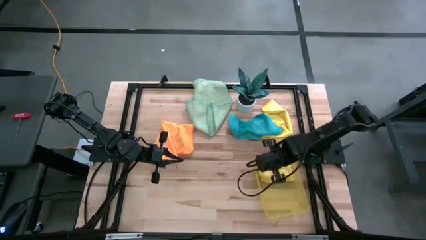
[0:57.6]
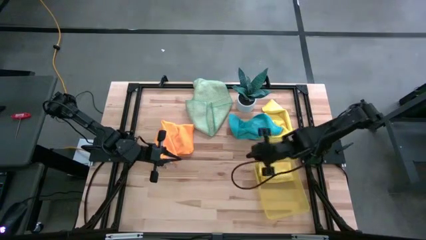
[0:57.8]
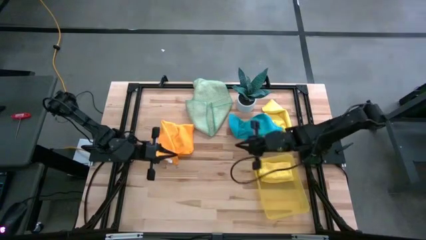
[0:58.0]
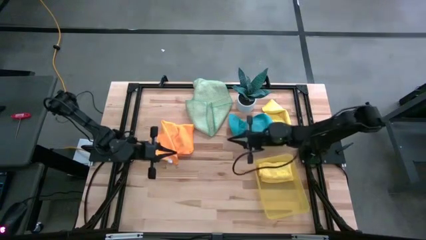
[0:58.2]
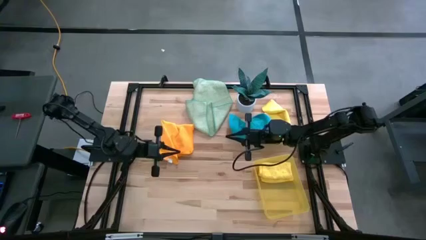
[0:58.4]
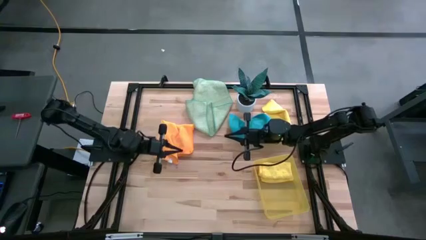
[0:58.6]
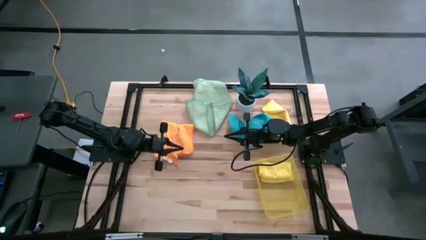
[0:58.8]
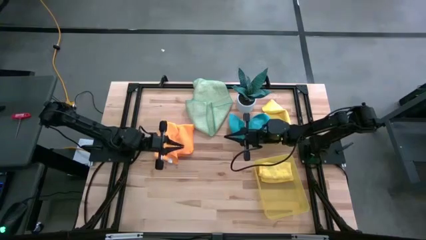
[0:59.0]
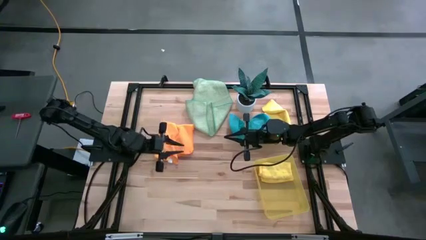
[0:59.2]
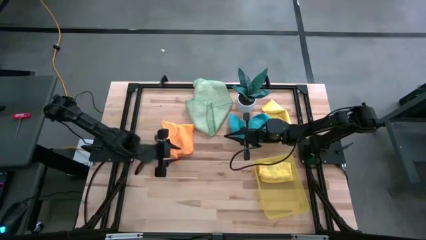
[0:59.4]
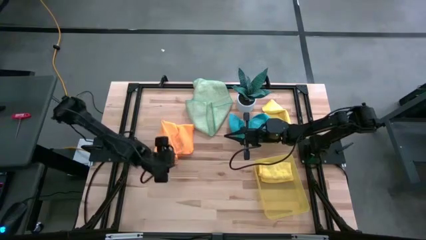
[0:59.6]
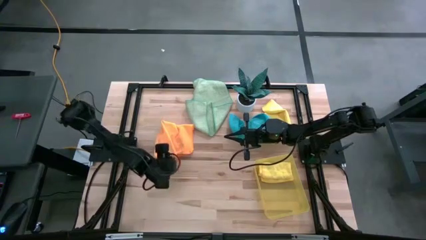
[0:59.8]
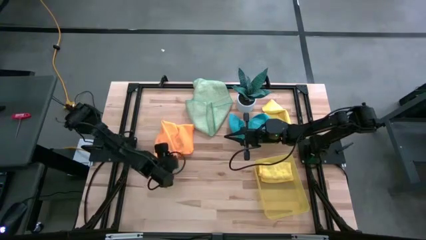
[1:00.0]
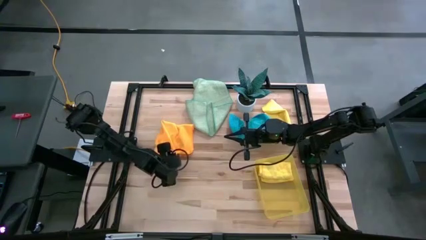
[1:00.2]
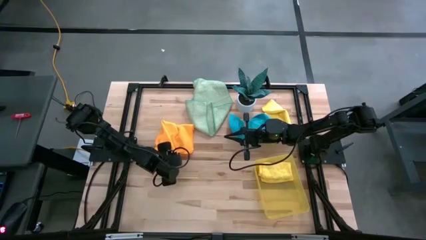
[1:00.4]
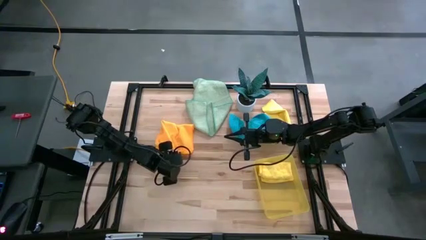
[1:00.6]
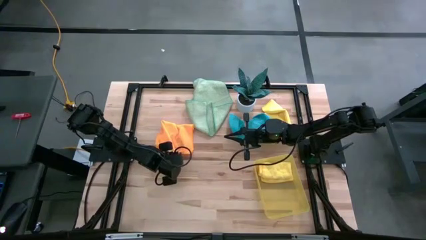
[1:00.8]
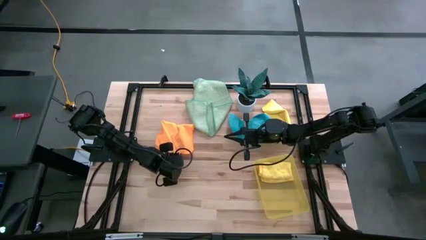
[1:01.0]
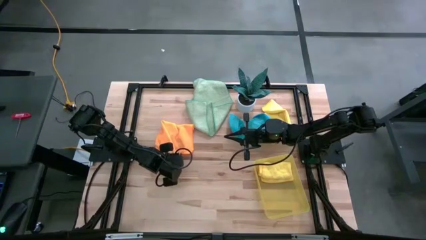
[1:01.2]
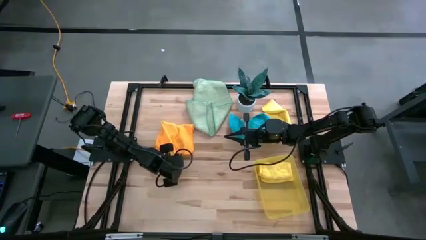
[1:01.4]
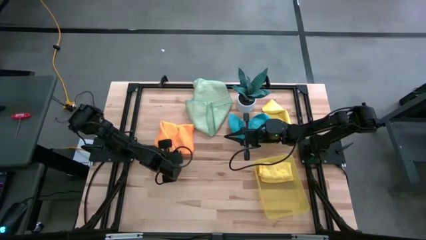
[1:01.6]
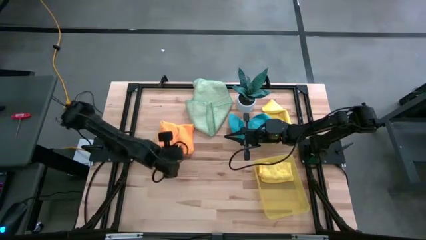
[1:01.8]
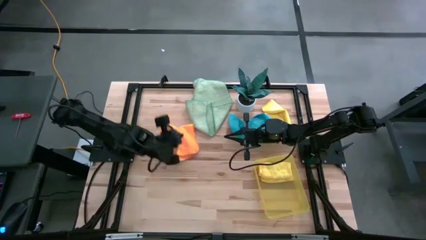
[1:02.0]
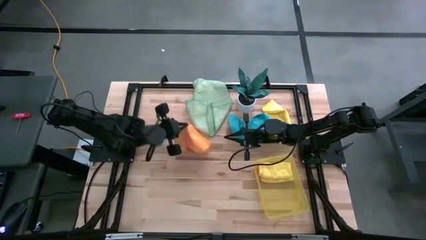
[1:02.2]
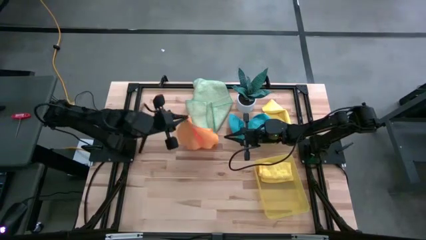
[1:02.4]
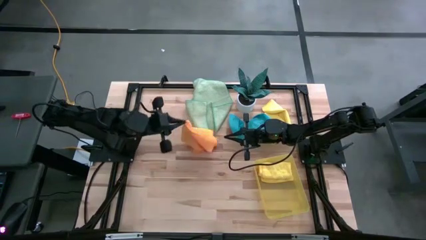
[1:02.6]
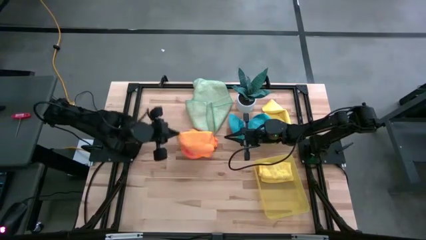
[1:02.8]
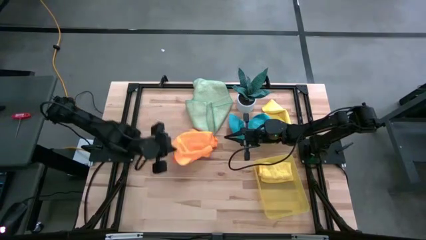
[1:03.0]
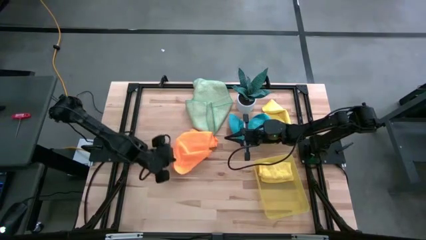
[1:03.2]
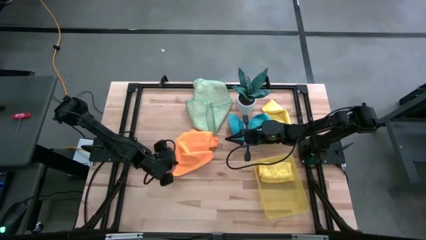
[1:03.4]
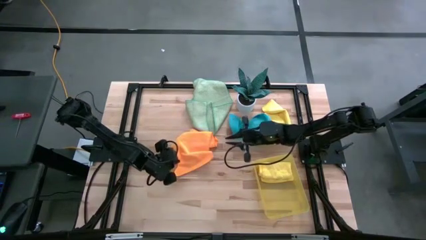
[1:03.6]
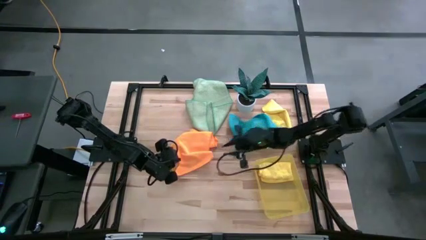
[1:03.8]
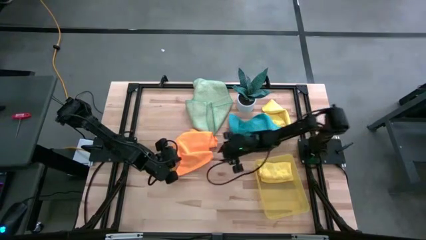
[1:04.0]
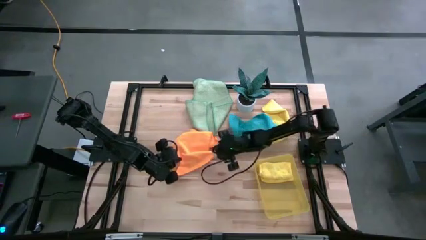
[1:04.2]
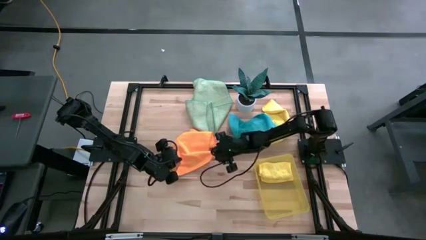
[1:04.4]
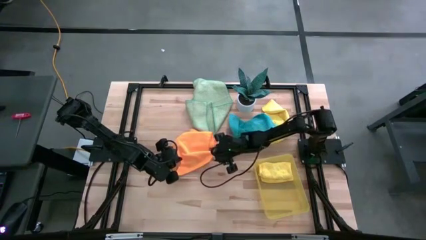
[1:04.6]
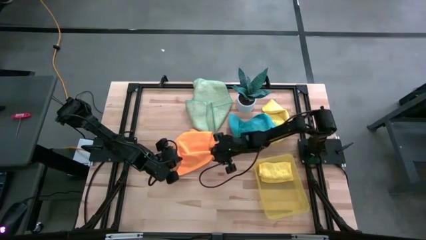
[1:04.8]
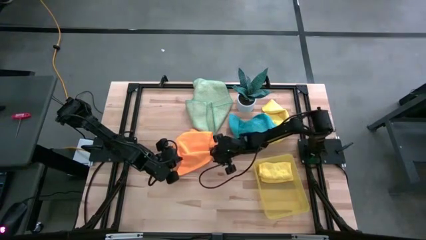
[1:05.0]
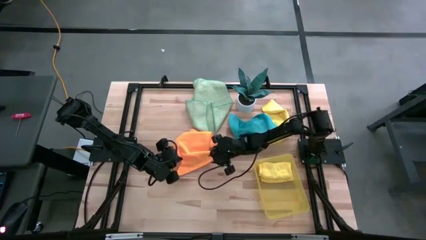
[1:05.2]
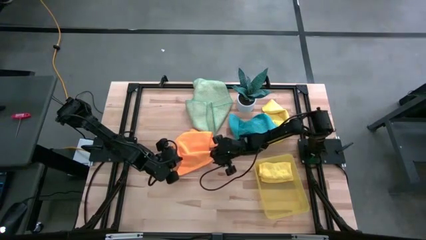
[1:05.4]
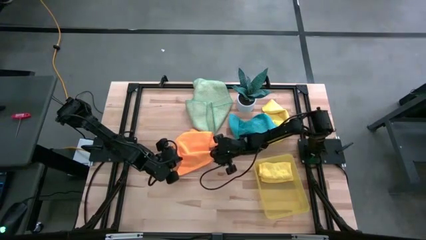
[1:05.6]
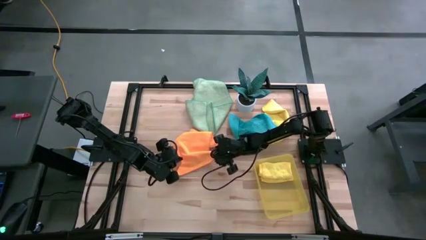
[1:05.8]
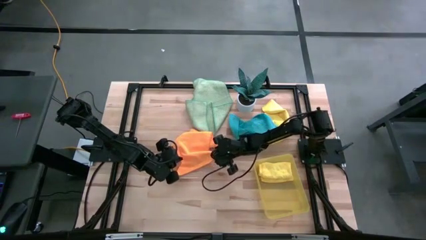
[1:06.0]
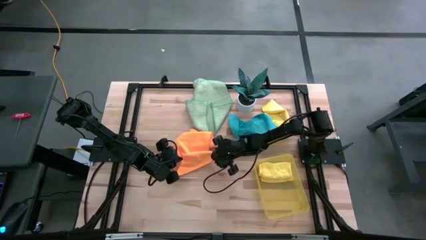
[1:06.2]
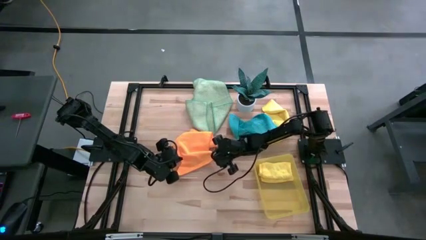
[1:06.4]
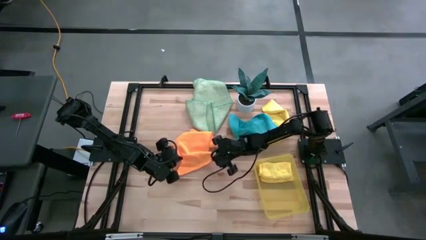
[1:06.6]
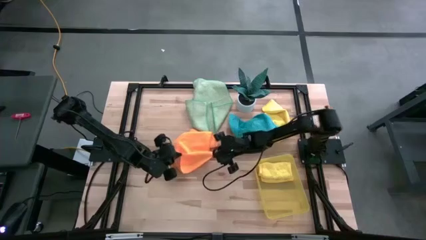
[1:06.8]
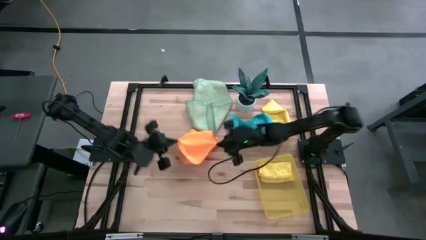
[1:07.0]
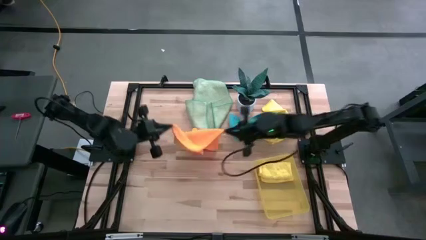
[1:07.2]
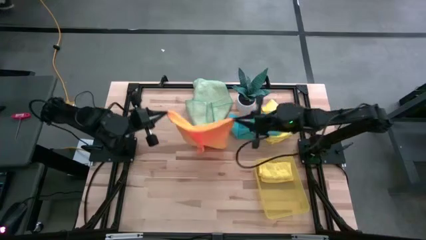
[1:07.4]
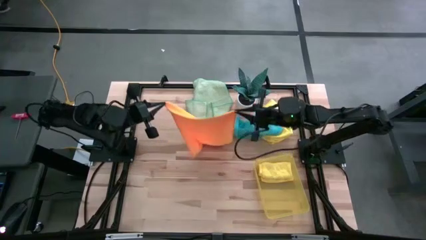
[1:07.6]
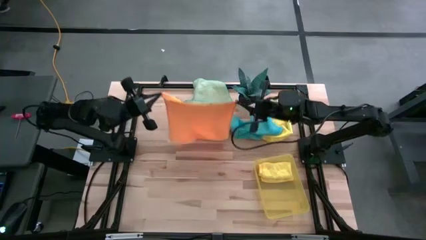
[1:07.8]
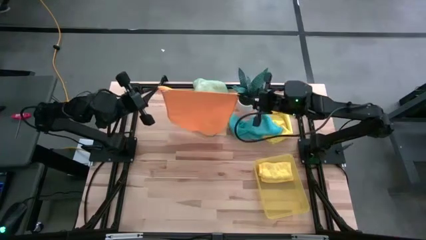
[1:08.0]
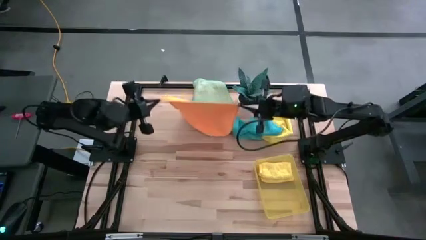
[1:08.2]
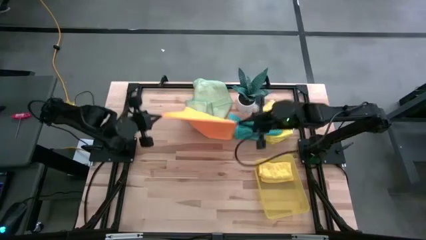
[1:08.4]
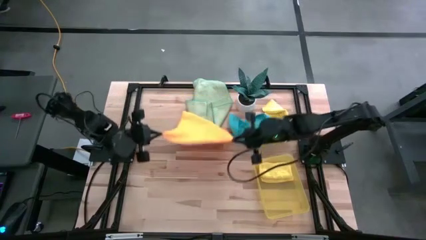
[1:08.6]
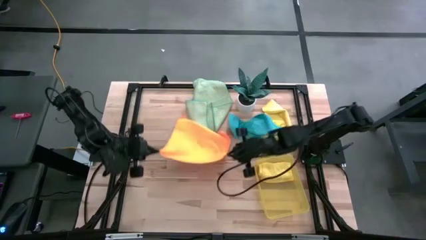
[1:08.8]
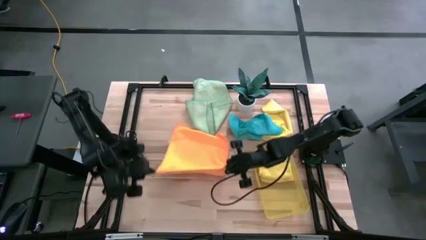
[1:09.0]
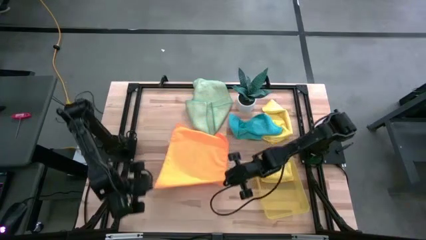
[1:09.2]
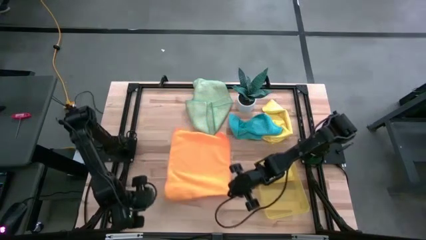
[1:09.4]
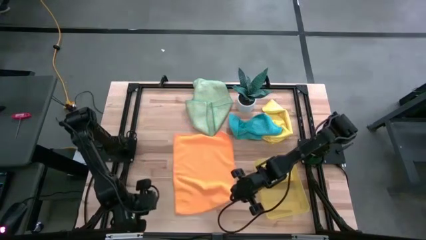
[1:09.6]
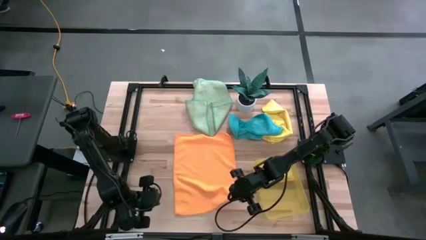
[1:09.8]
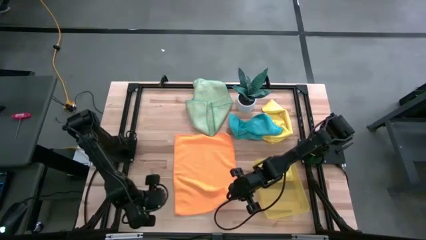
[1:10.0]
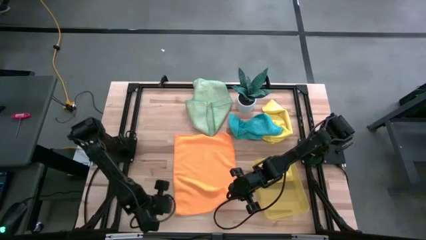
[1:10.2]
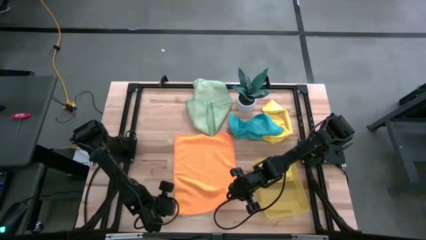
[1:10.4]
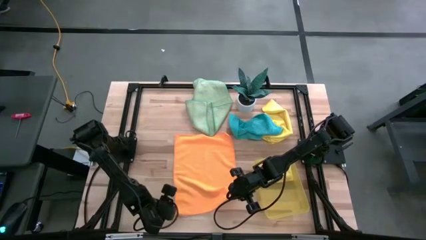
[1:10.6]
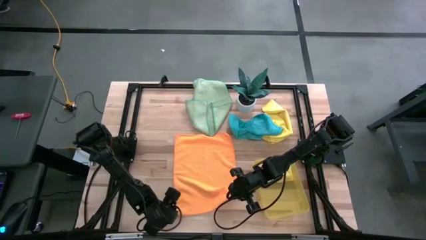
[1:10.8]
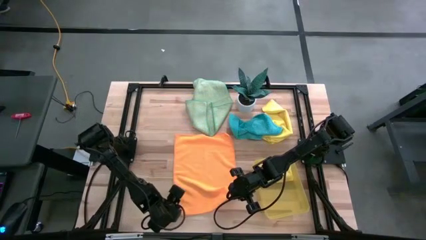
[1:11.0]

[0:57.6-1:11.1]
Task: Fold microfiber towels
Fold the orange microfiber cloth
